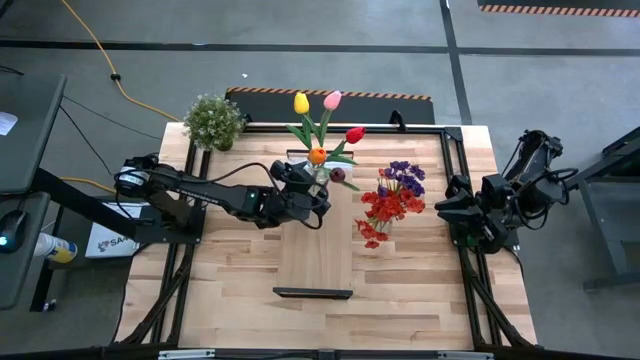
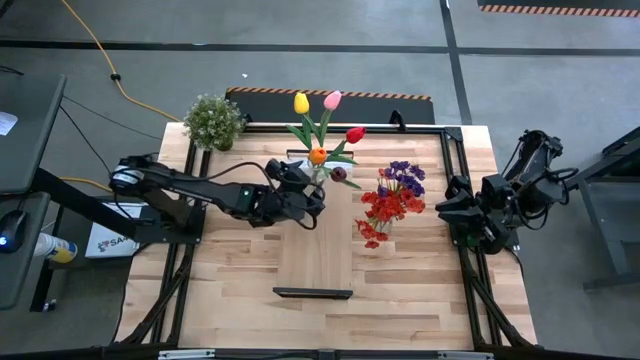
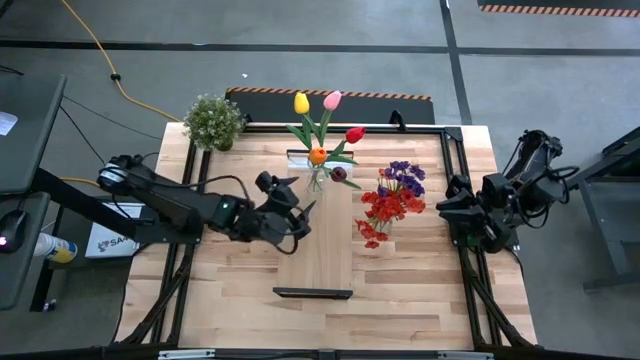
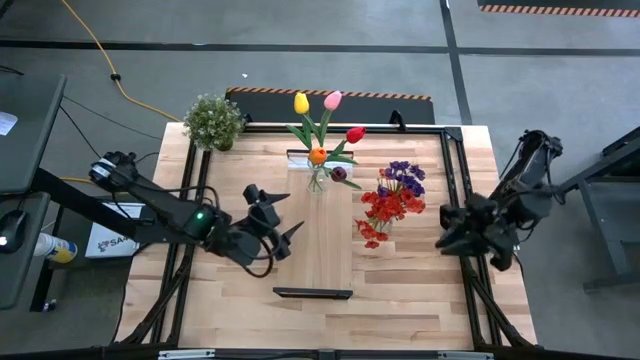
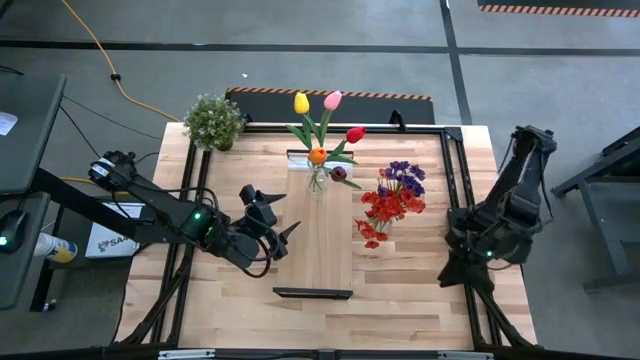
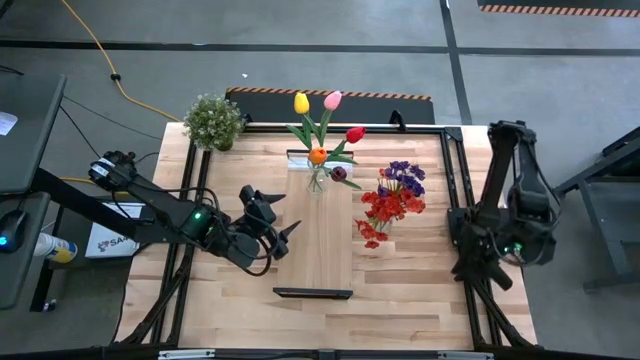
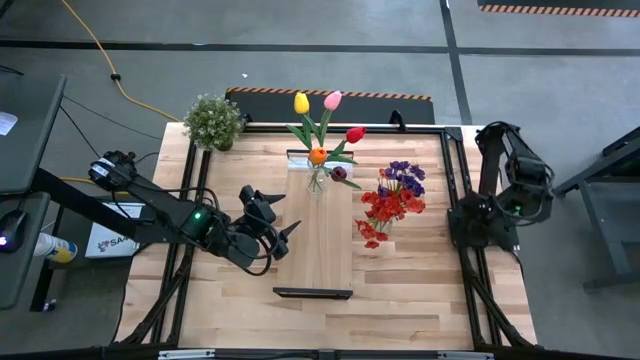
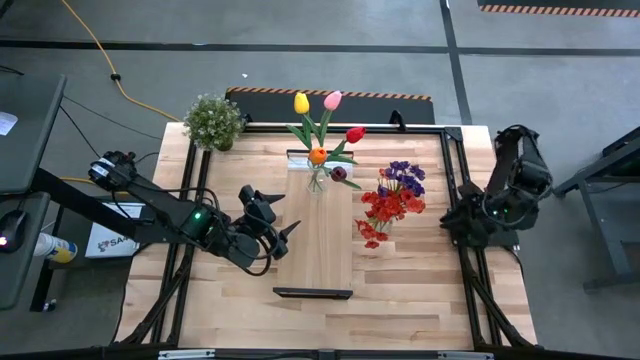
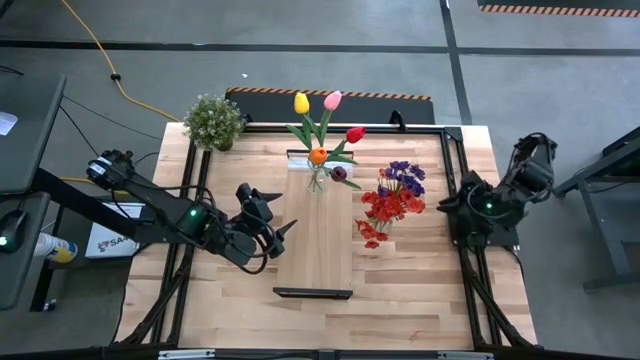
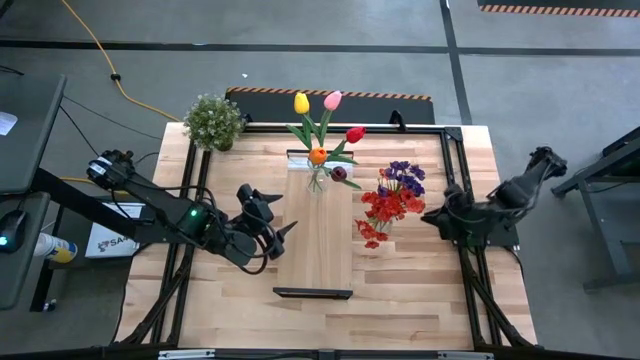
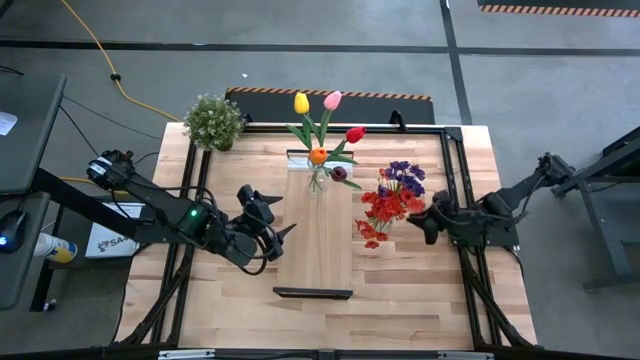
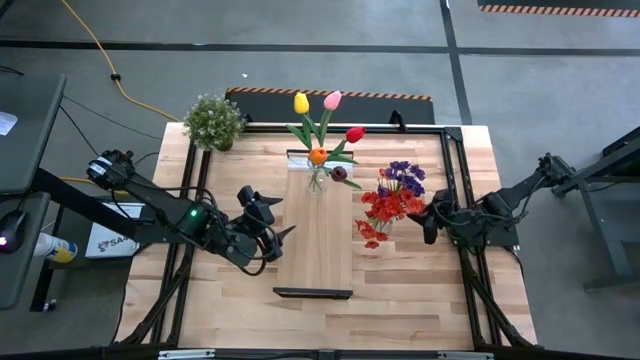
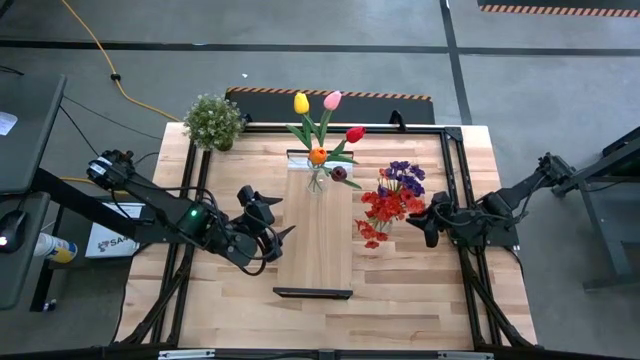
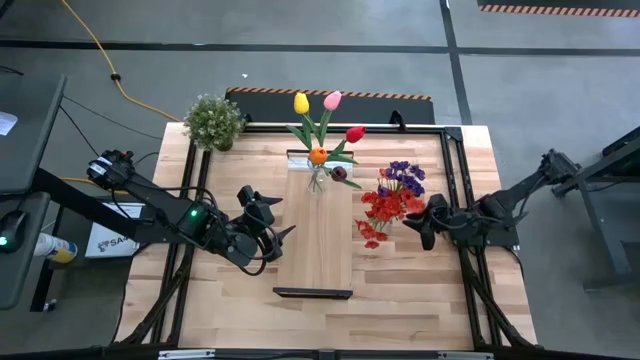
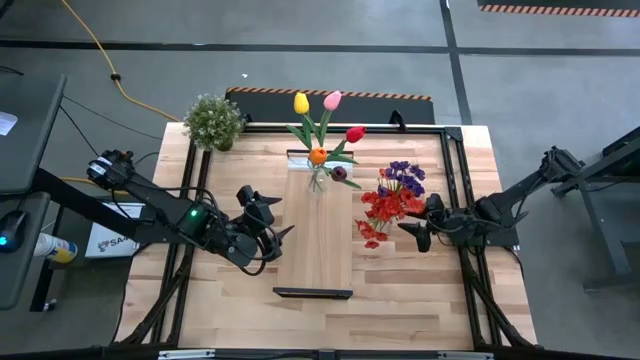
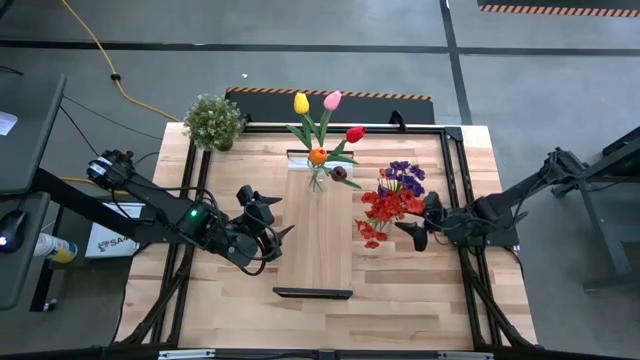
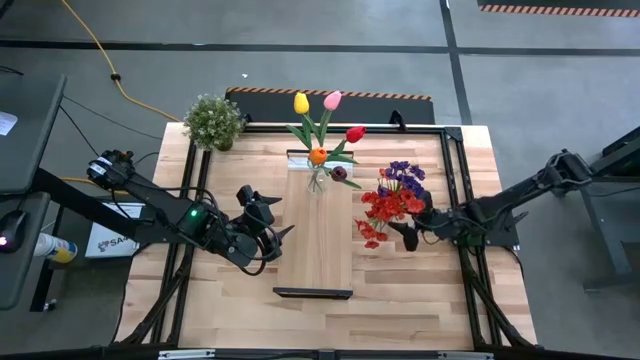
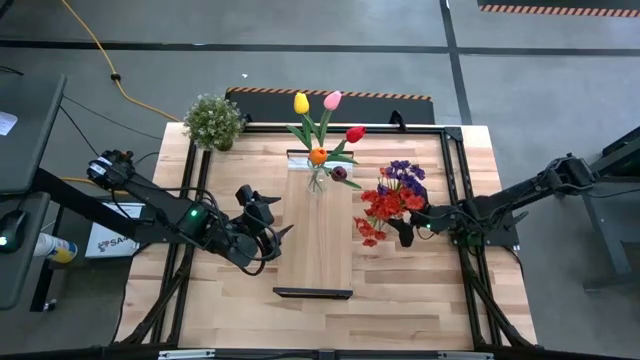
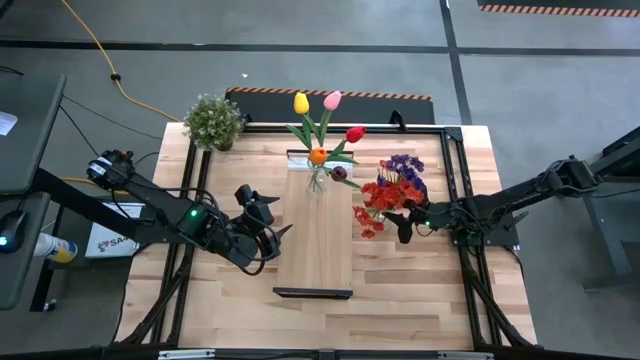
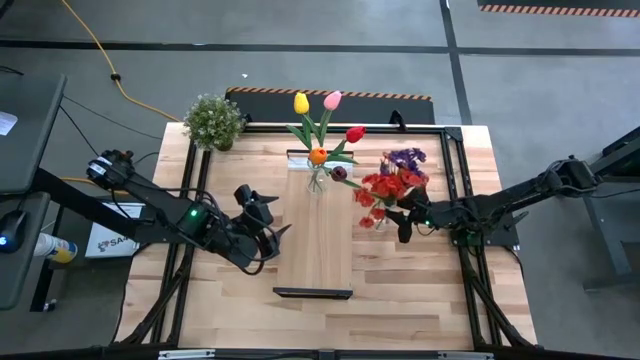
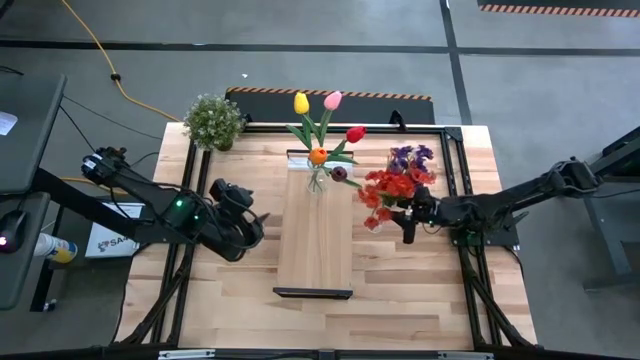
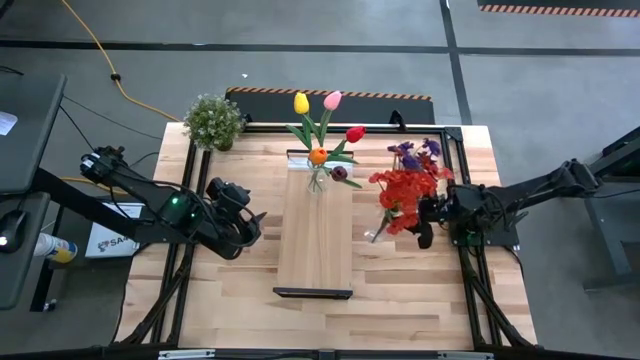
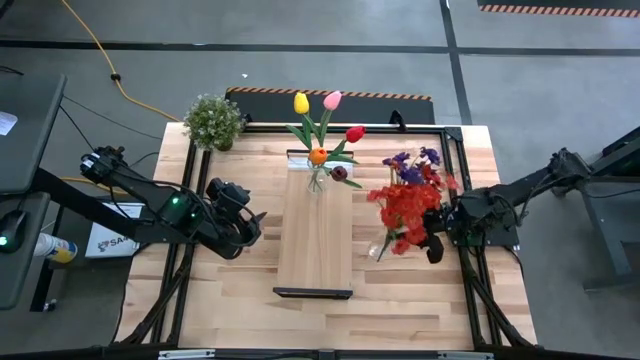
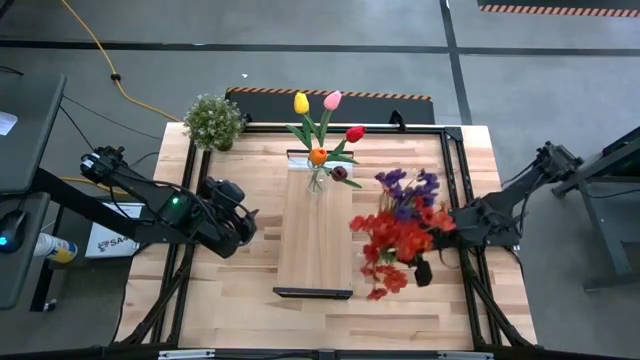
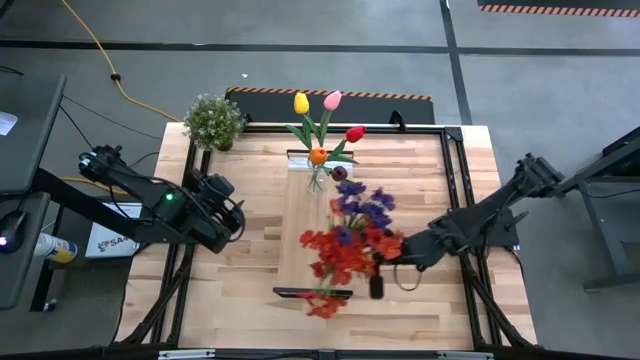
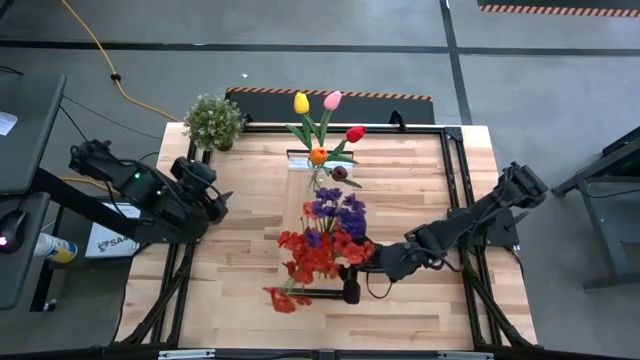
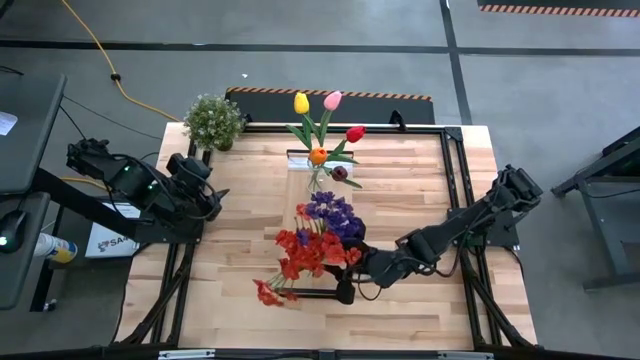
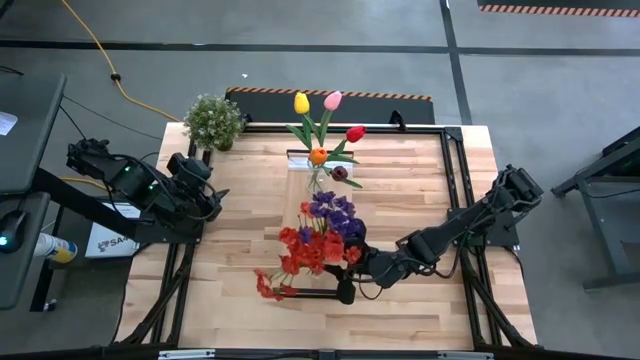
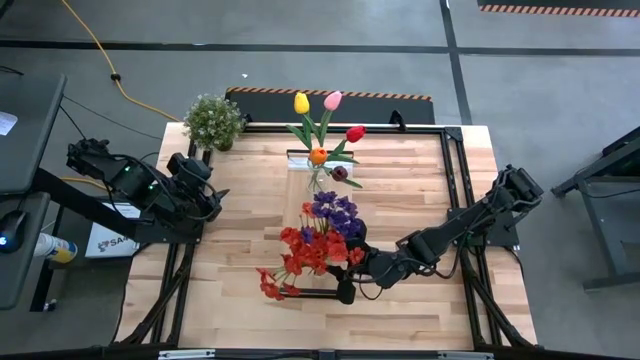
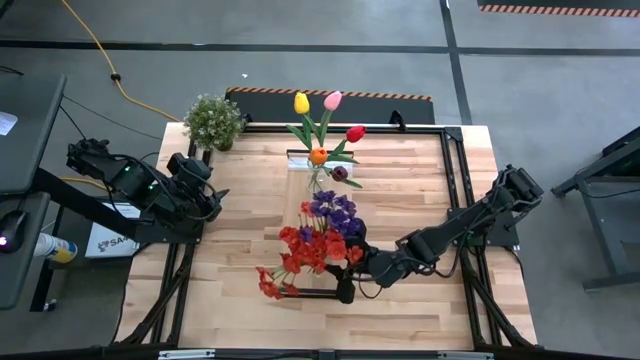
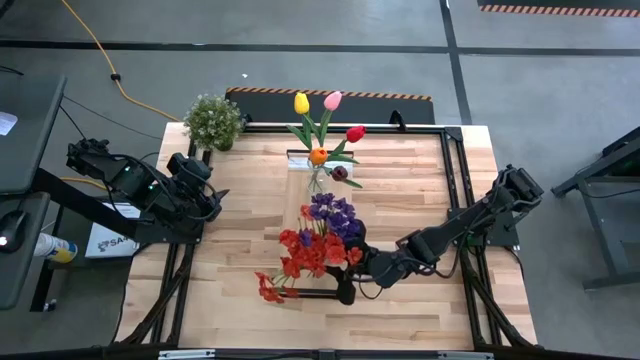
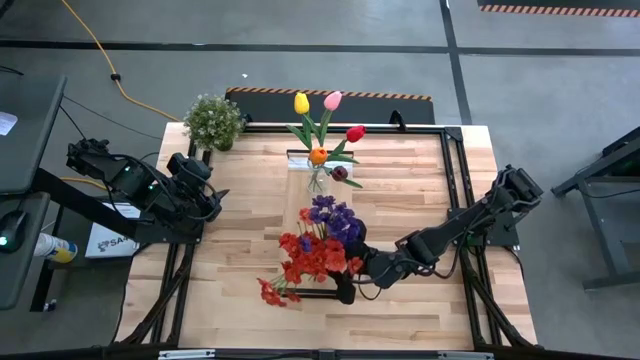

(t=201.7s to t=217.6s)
Task: Pick and place flowers into a vace then onto a shelf
Put the transparent vase on the shelf

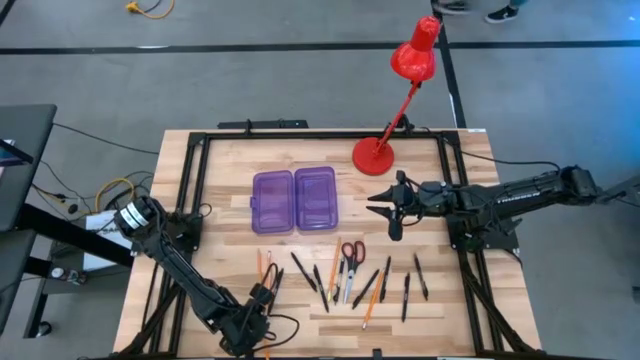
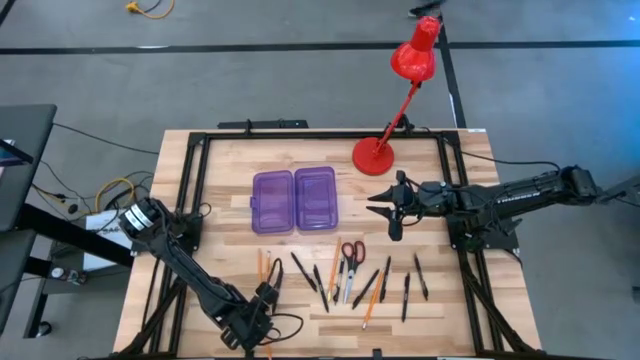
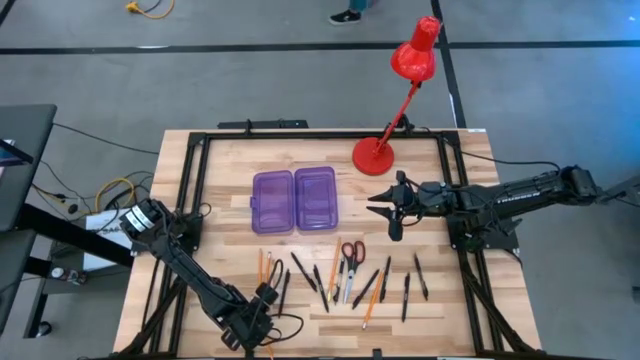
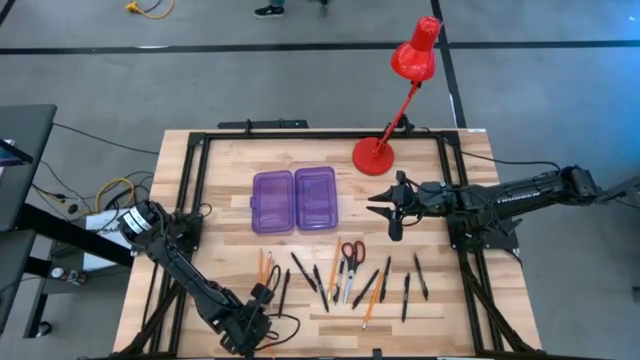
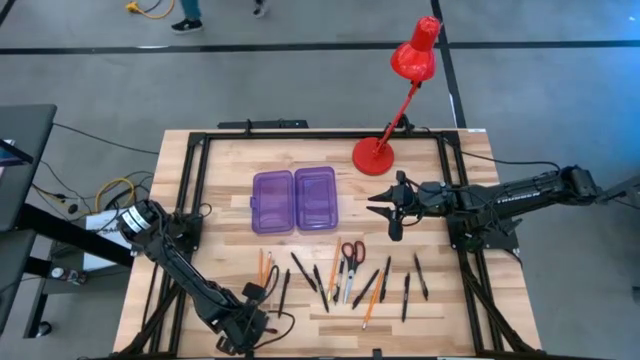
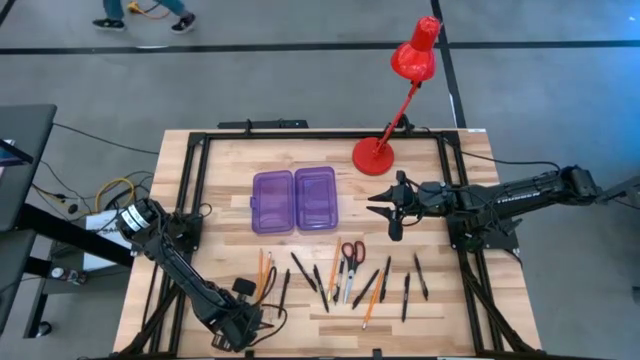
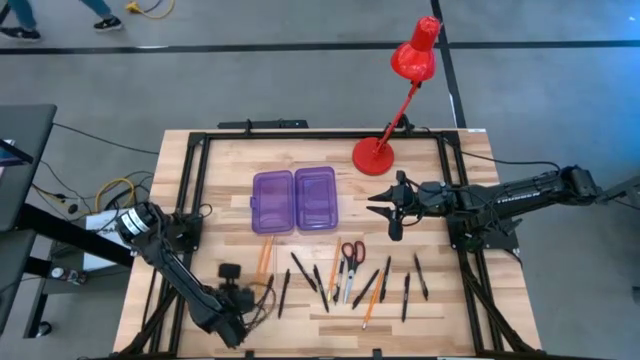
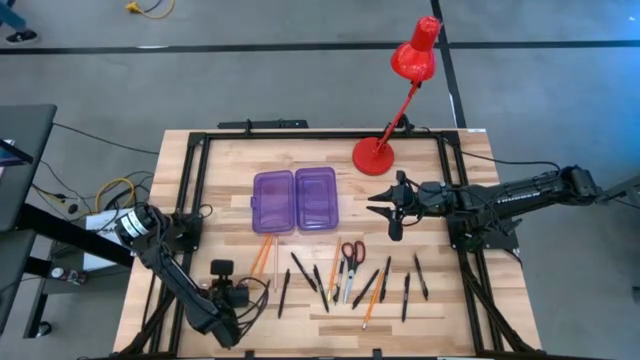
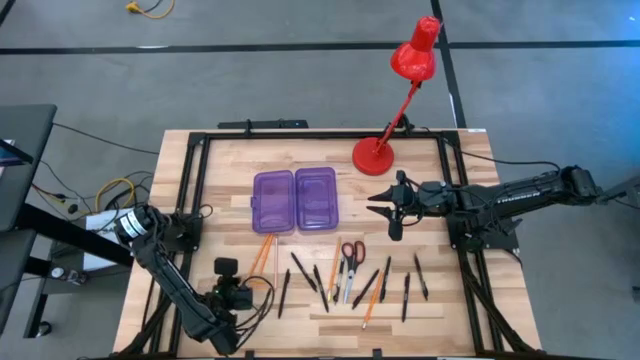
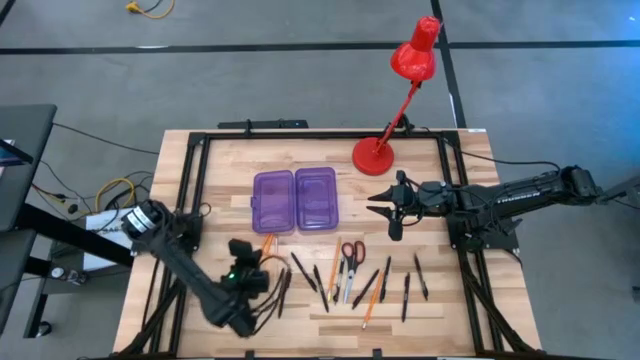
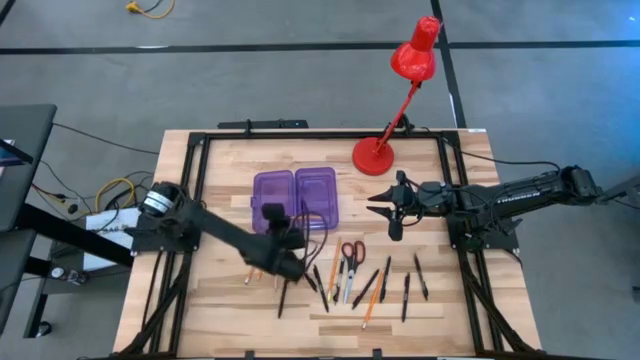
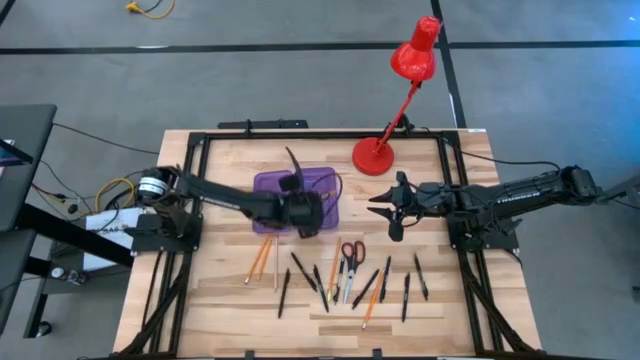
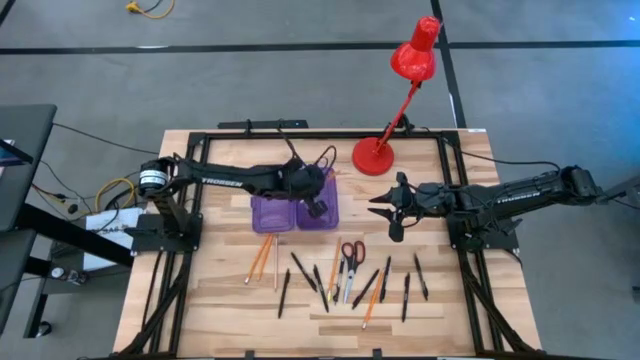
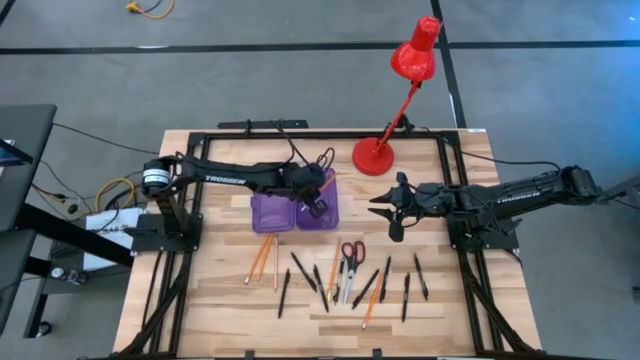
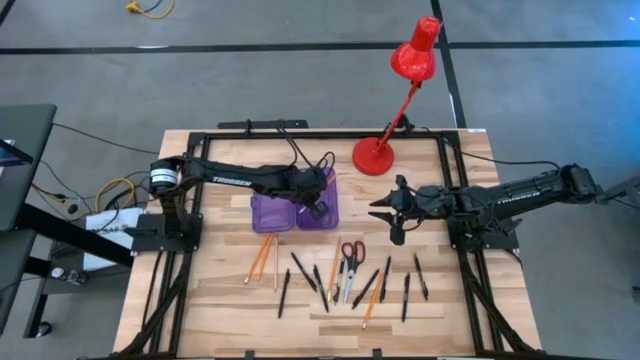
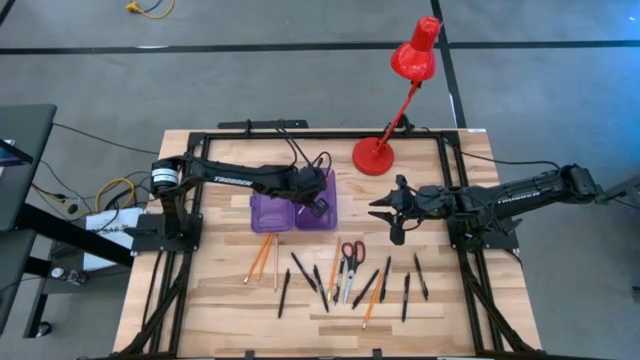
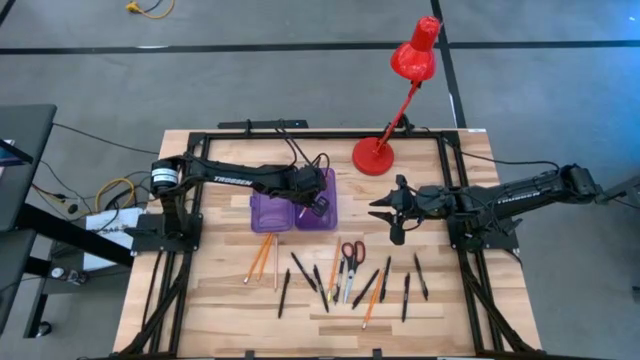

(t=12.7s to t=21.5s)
Task: Pick & place school supplies into a supply box
Put the orange pencil into the violet supply box
